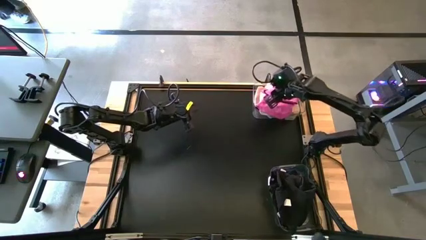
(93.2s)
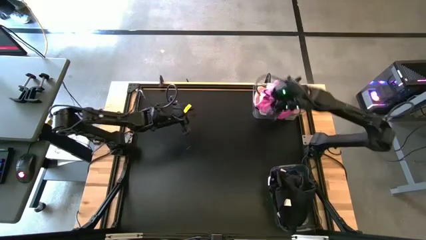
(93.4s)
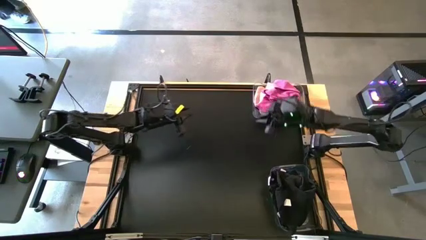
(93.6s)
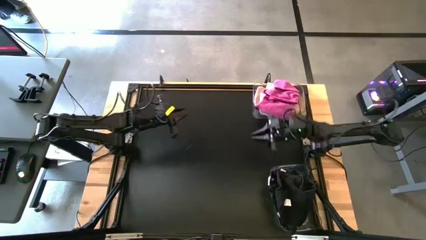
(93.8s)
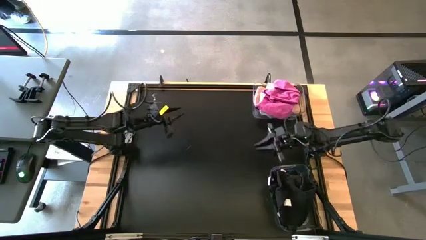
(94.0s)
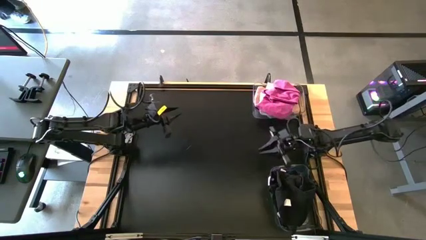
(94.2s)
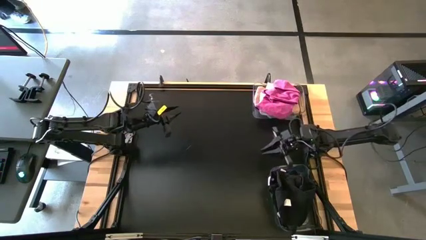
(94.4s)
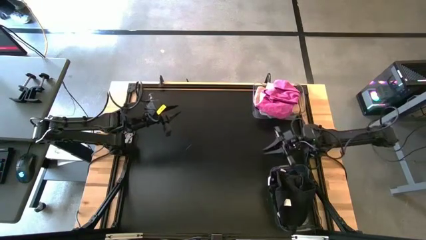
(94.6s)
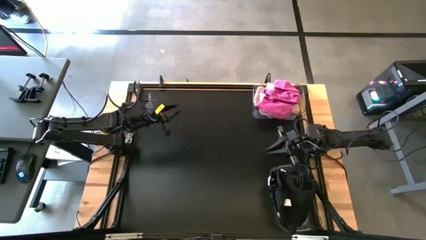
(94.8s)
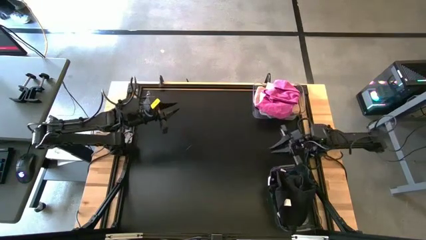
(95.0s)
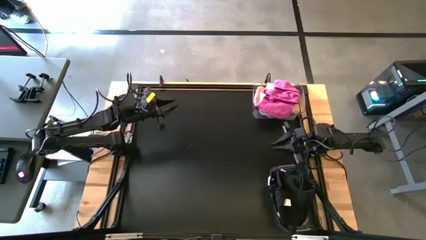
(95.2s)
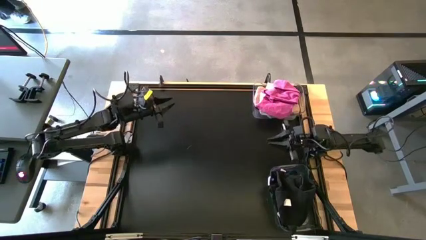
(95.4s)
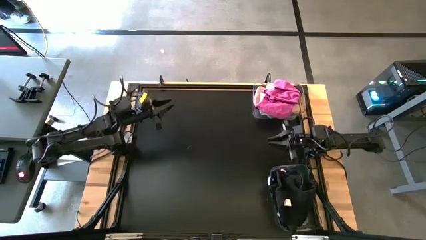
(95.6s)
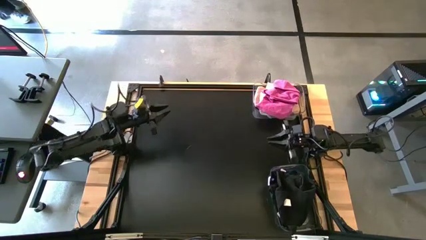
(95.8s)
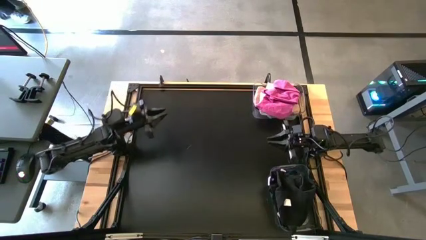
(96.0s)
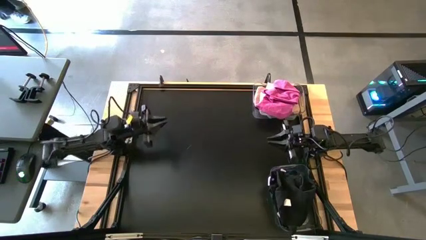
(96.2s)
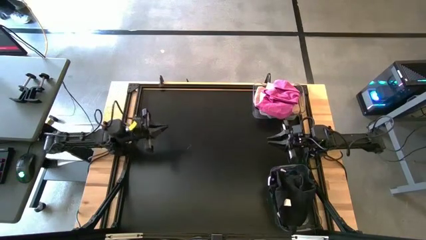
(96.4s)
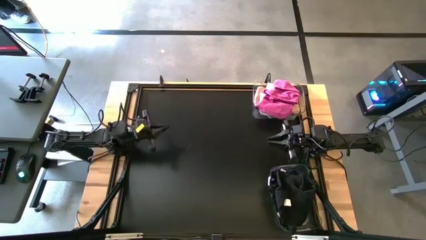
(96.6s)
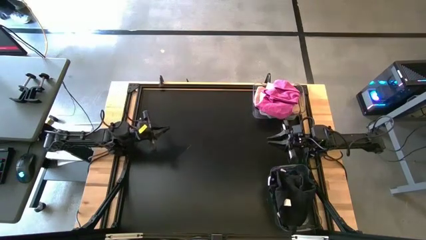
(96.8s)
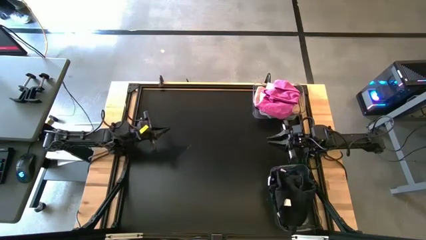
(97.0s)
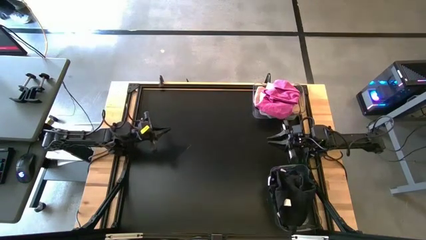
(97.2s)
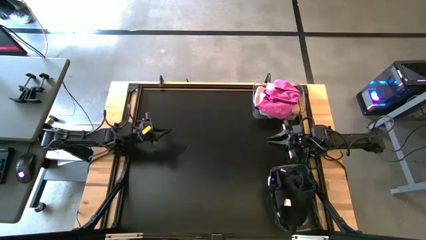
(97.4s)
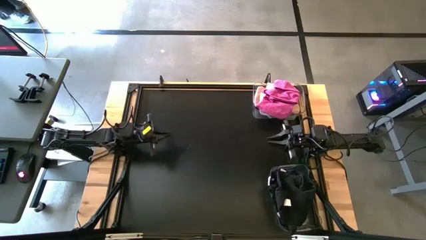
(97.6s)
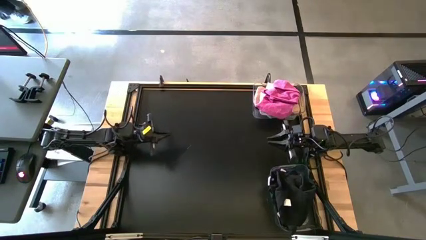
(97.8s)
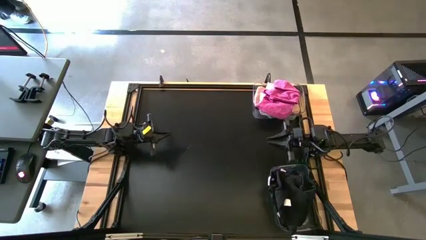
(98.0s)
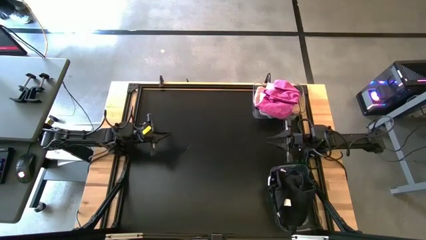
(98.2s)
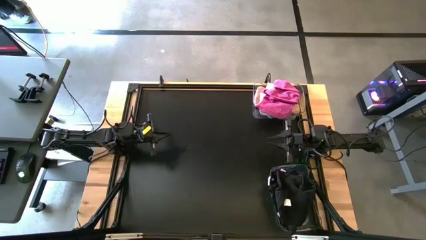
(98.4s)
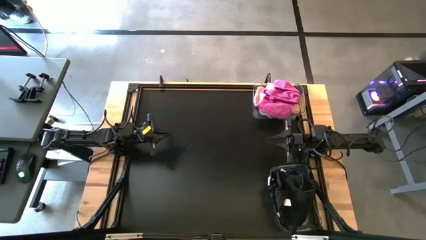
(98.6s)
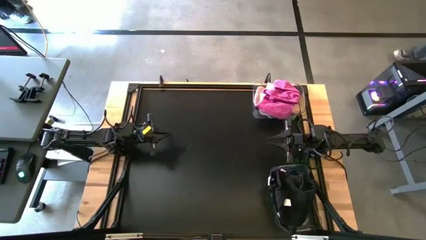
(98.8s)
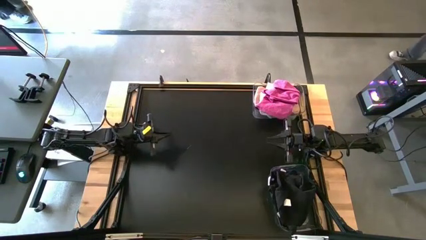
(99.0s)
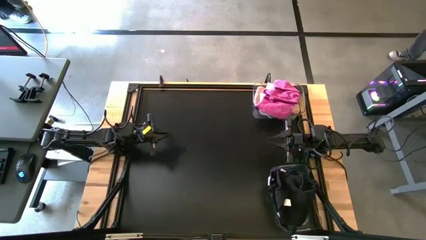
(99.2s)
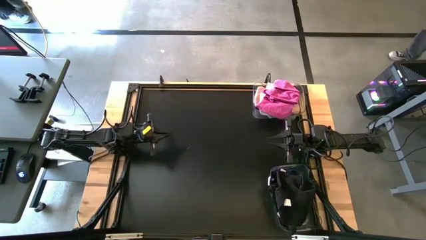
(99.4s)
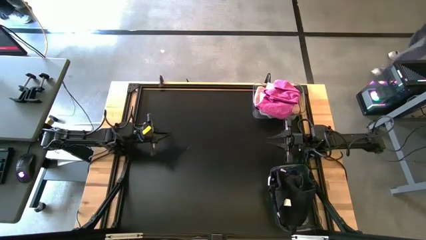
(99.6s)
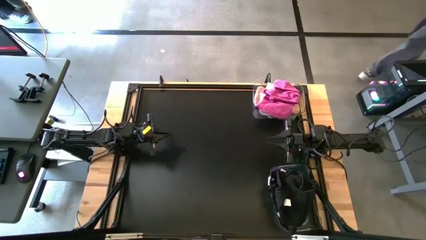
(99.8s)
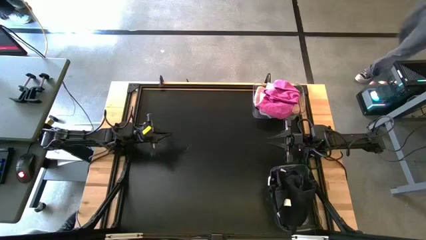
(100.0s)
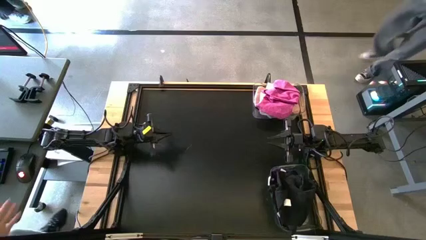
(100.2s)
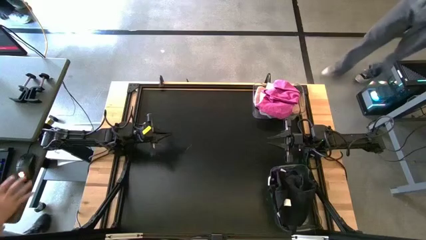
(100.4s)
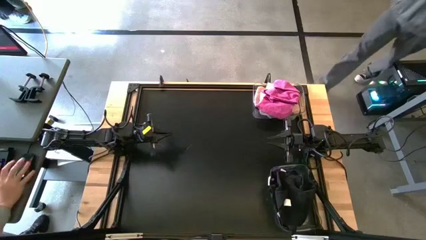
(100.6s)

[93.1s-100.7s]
Task: Sort towels by color in basket
Return to Home Position

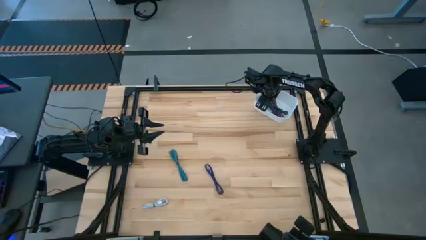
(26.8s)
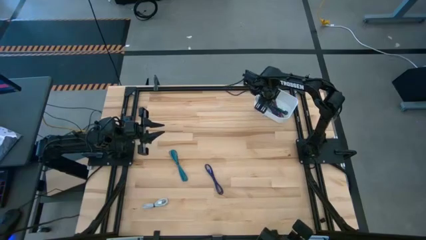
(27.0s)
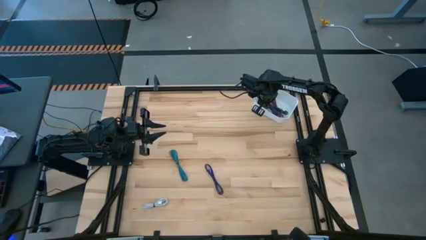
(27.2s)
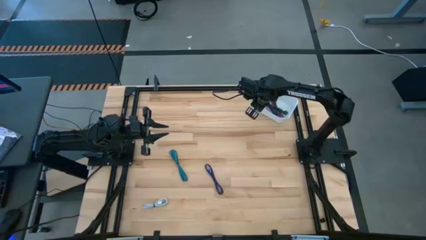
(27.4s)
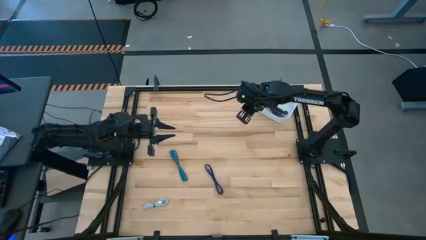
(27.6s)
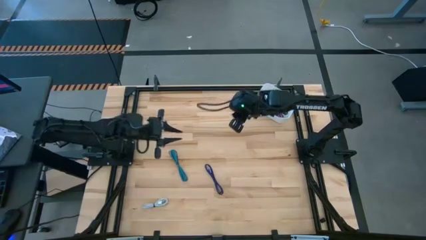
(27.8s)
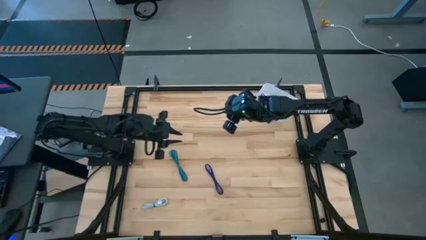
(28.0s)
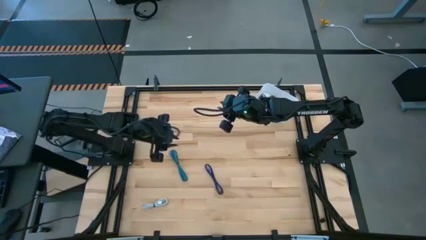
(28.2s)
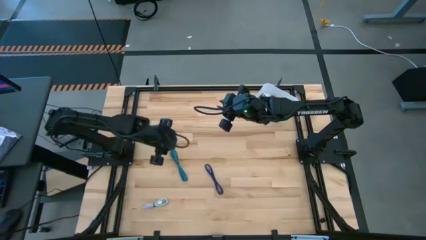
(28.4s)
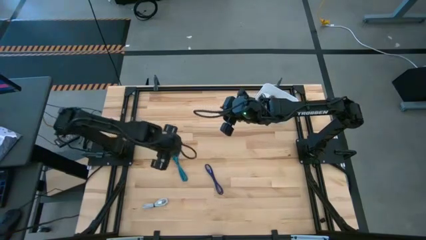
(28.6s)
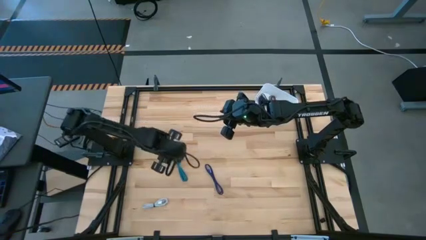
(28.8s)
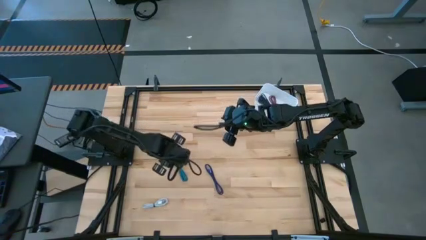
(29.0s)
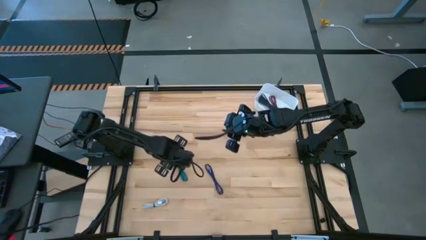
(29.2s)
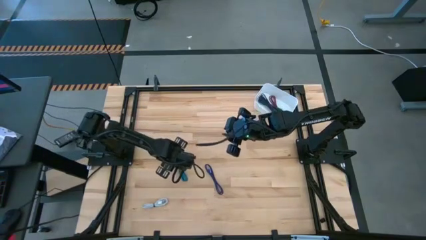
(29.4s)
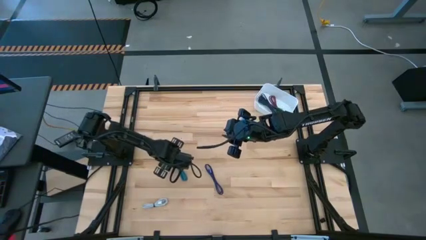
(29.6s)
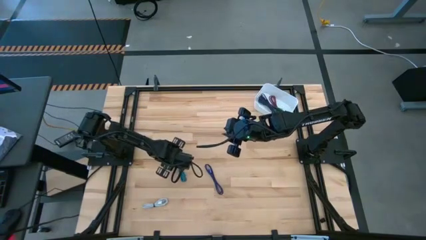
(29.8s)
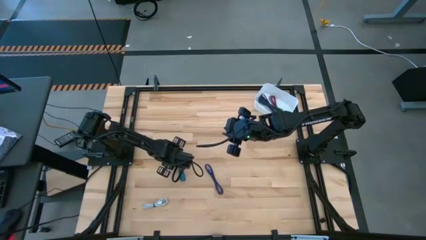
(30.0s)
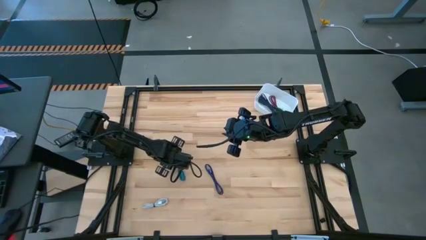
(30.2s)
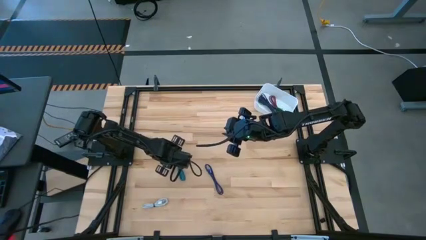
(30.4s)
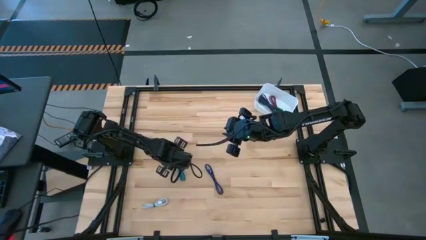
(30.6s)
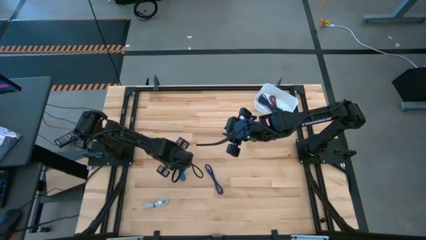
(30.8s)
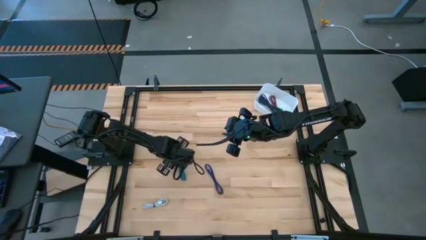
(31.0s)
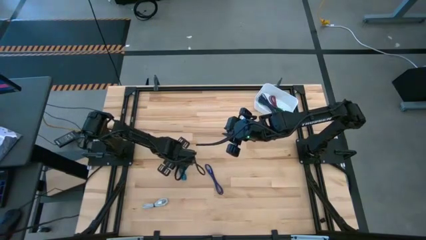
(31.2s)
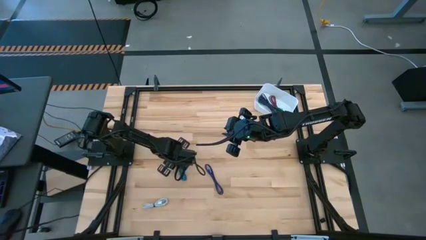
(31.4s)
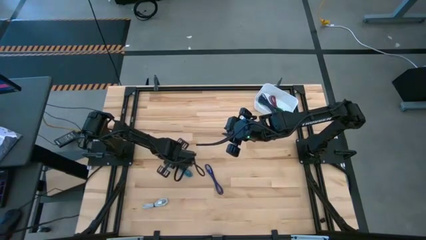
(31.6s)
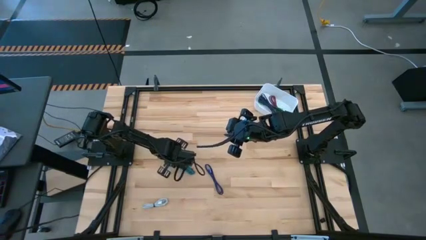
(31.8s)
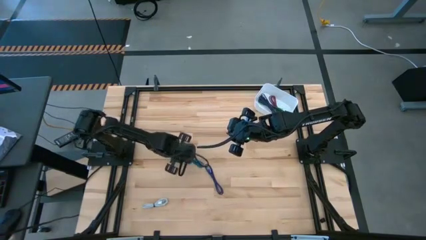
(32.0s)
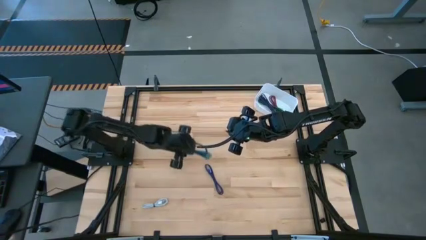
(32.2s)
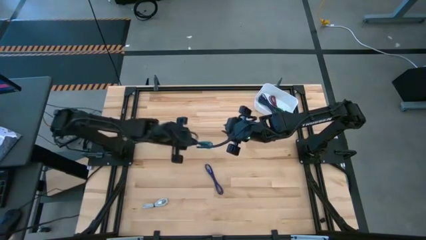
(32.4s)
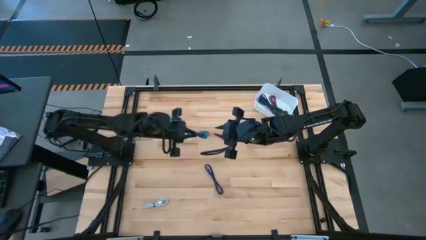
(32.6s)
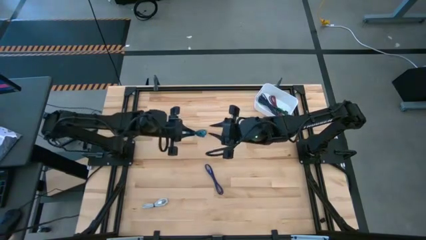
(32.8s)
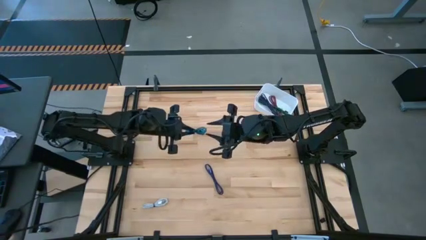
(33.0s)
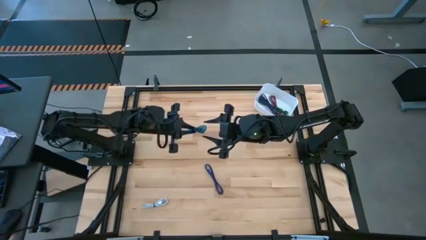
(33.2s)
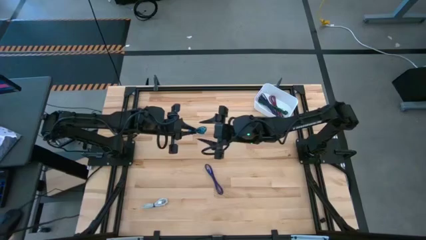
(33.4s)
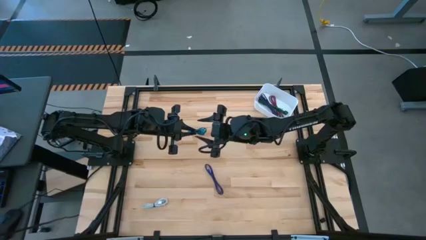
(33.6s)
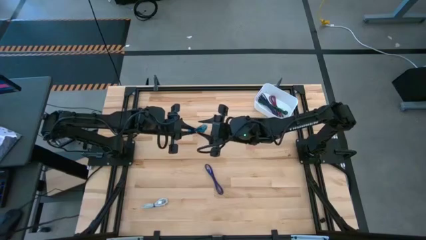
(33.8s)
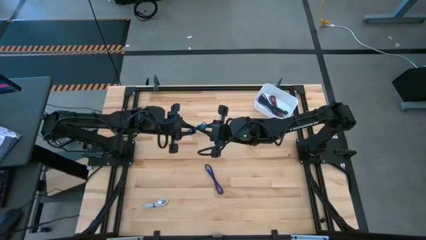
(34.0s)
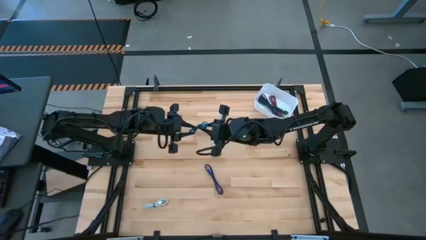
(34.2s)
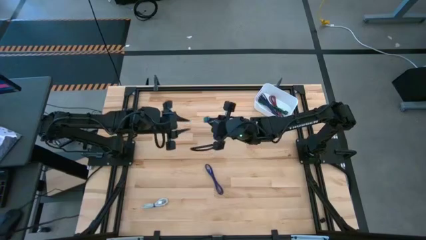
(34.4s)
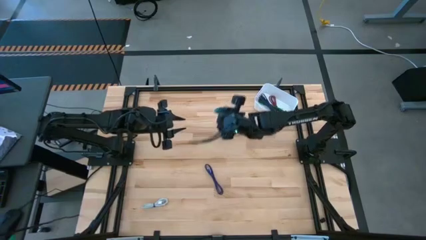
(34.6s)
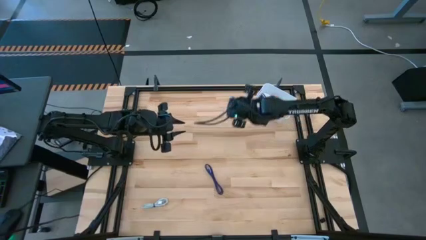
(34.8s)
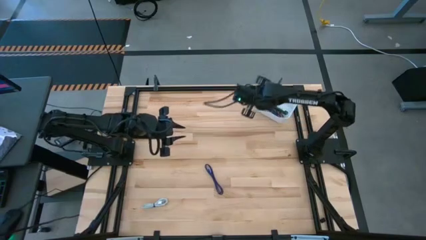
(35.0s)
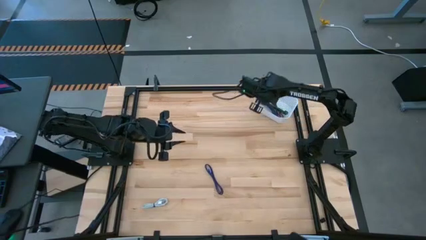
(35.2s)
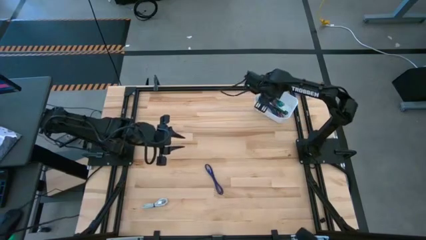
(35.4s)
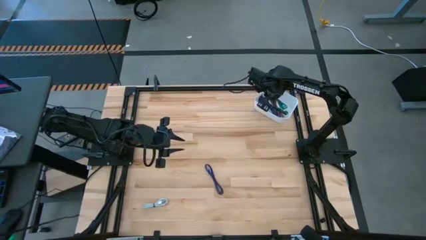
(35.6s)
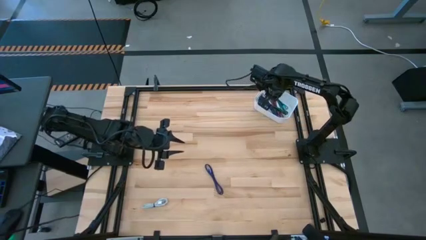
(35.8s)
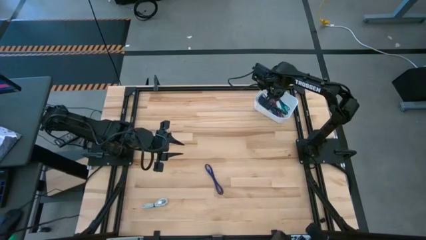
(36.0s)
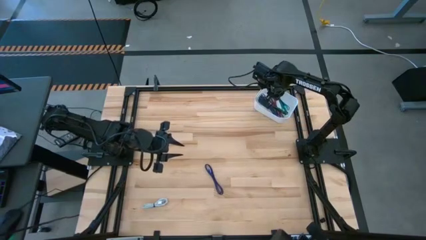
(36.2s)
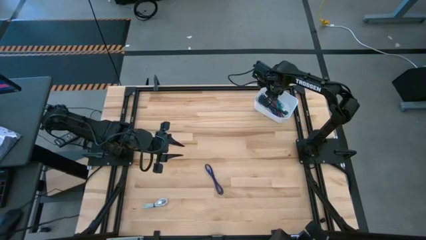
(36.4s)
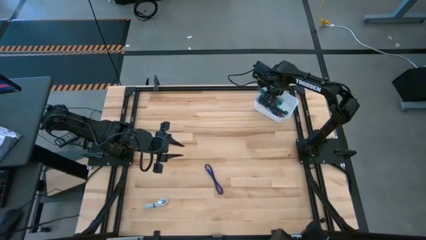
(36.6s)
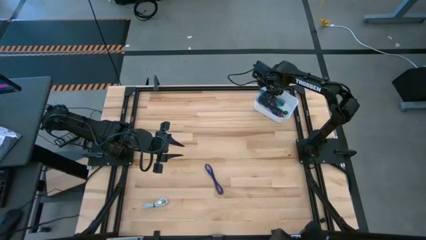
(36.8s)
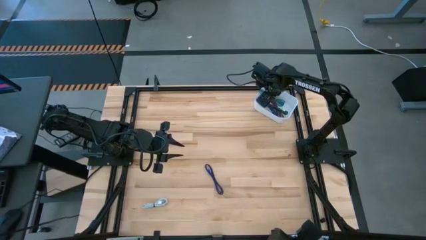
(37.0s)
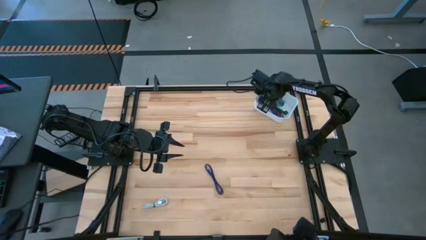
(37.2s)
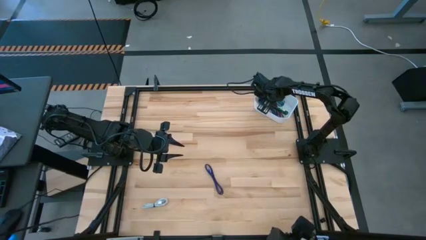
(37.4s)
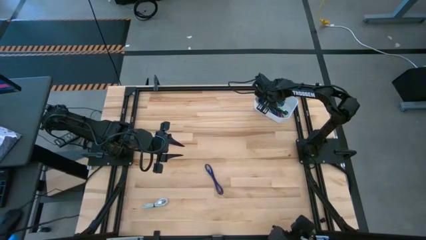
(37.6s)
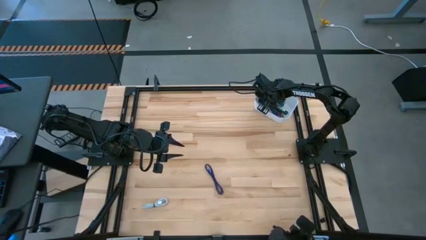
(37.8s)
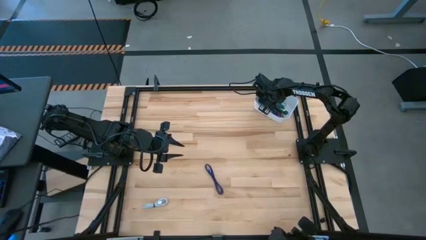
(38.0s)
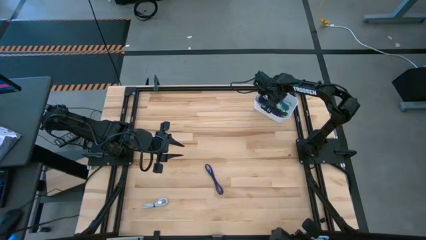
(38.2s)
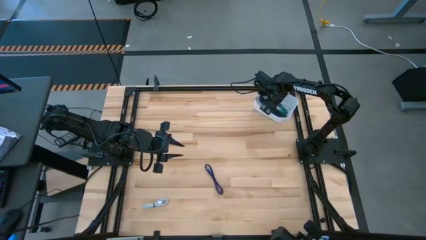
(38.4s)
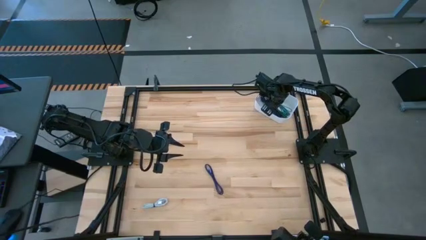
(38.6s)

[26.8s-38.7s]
Task: Pick and place USB-C Cables
Put the light blue charger cable into the white bin
